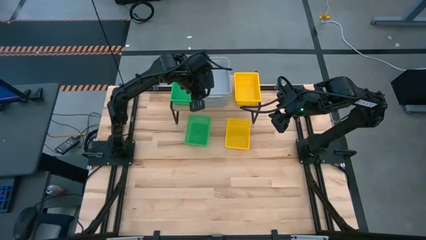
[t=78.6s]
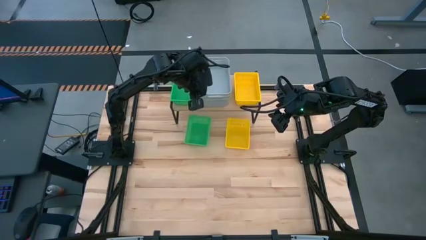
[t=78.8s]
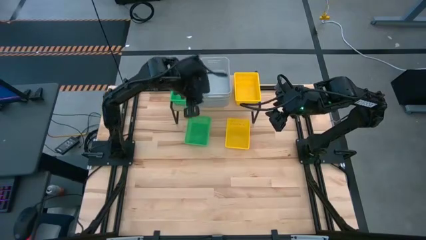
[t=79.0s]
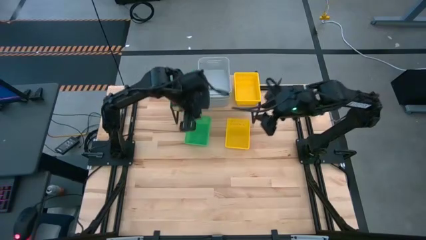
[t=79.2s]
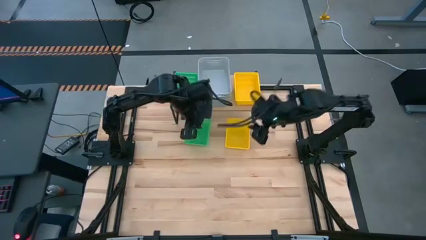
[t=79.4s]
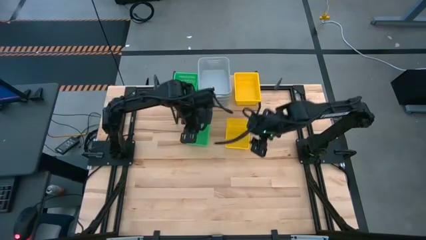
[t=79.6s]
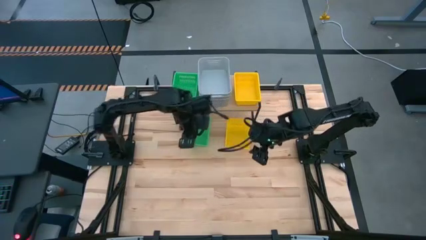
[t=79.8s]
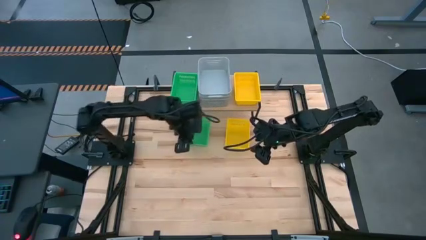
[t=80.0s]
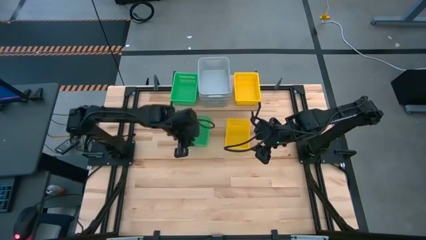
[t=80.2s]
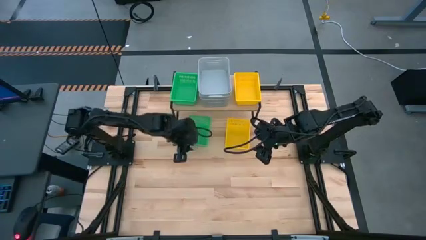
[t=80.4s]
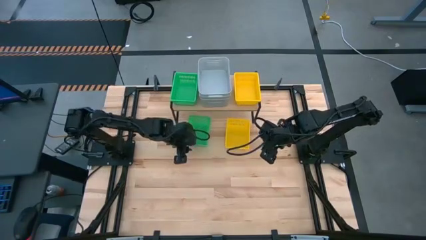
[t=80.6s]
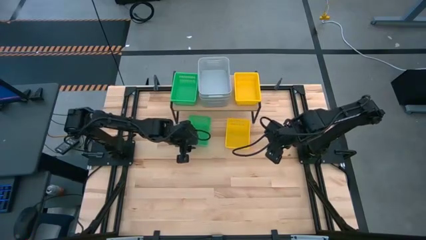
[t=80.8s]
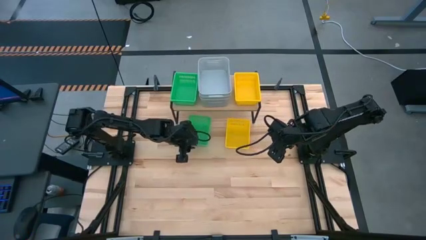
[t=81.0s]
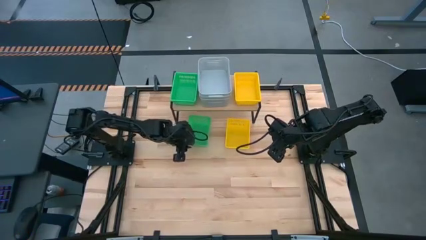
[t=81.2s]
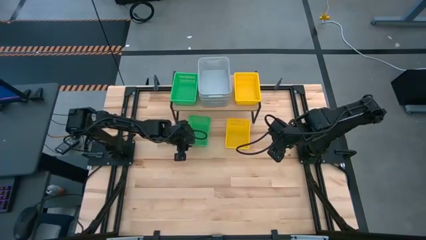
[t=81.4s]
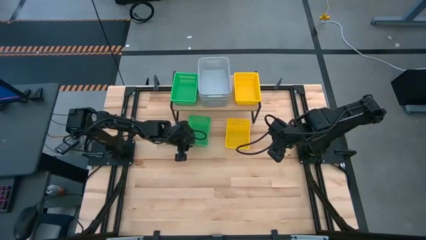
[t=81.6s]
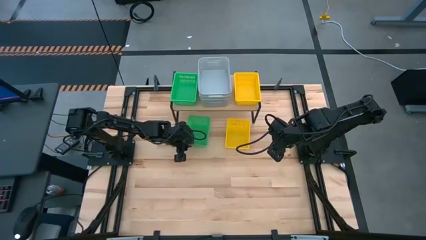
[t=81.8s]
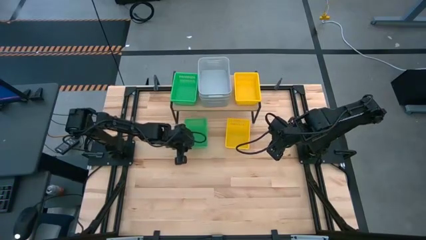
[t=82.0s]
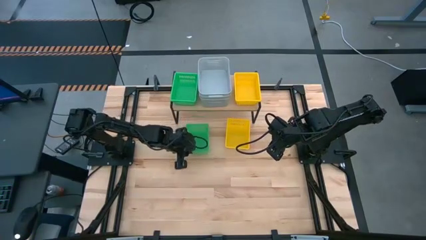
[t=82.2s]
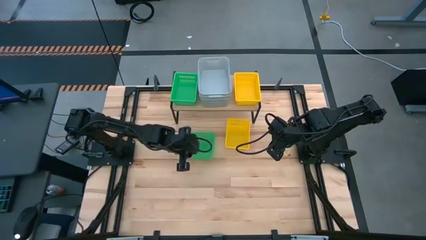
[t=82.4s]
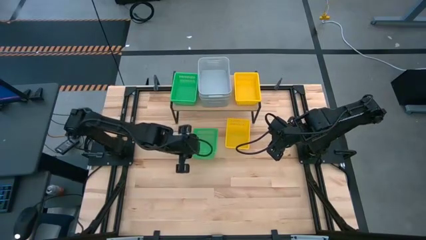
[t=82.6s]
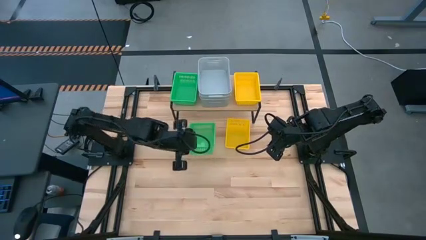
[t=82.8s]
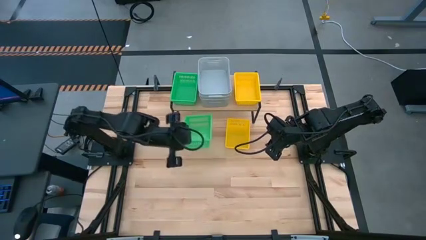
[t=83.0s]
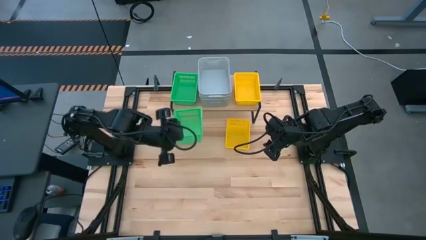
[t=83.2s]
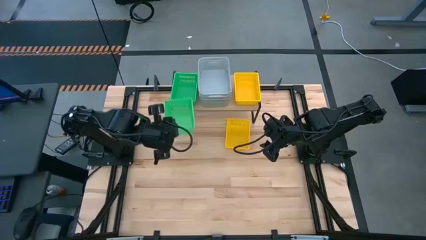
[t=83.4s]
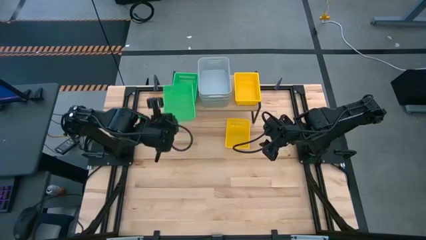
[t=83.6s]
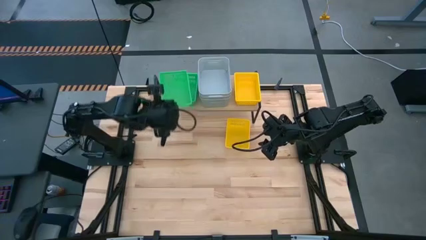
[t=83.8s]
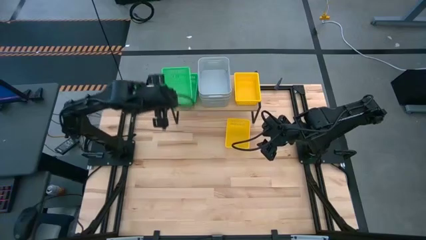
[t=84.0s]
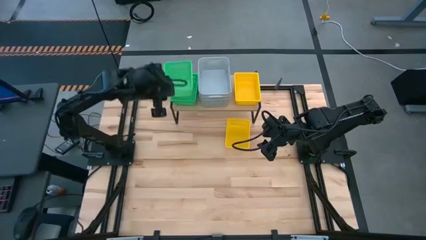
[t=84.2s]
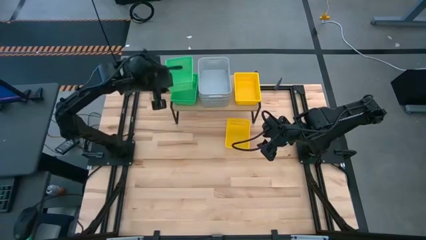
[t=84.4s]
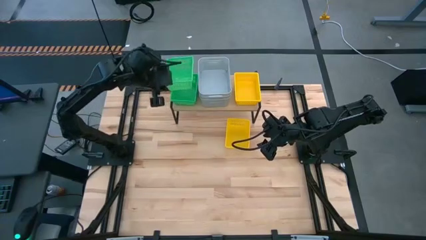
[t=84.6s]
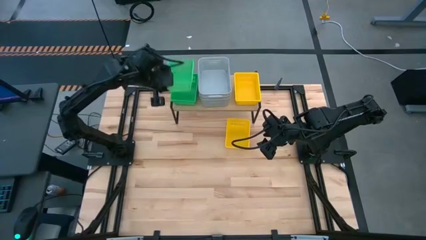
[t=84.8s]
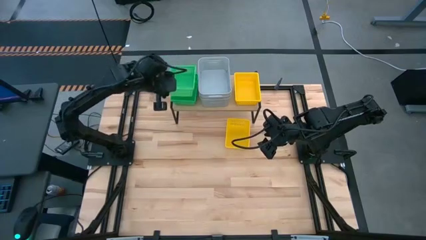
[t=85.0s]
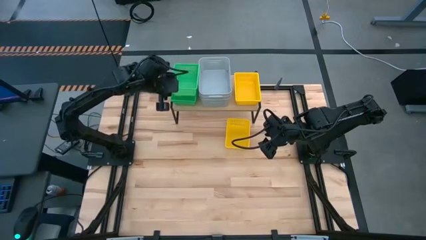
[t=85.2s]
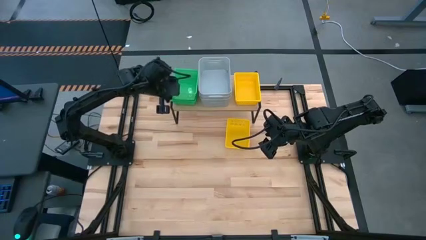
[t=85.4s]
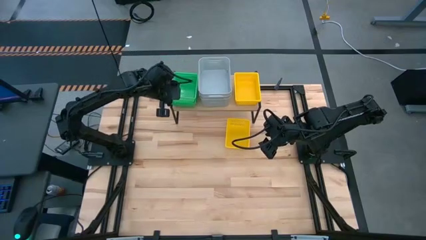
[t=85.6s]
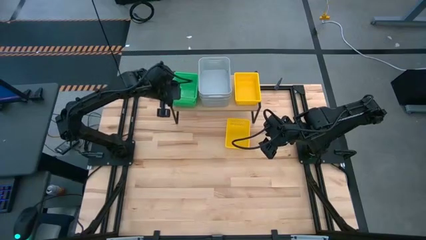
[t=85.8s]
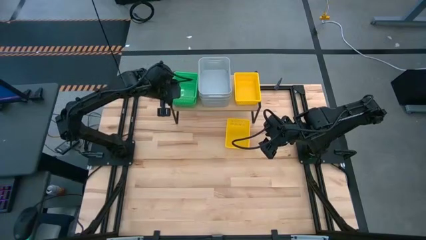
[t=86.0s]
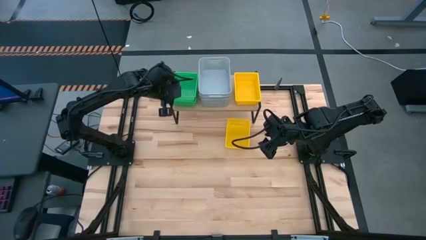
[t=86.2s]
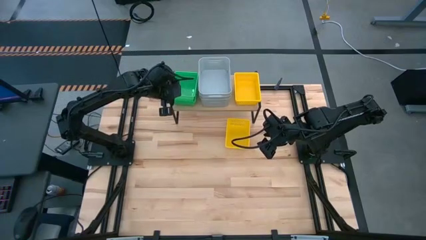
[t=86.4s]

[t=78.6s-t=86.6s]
Task: Stack baskets on shelf by color
Stack the green bin on top of the green bins on the shelf

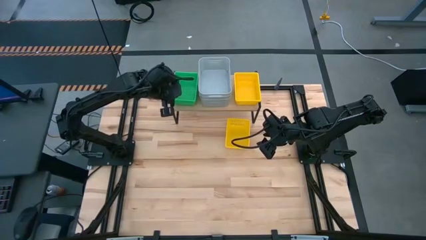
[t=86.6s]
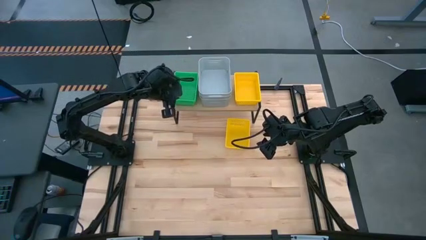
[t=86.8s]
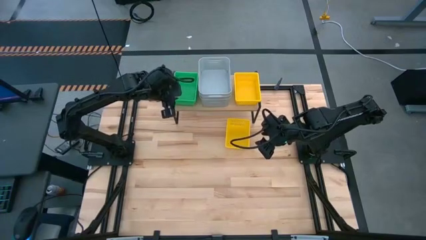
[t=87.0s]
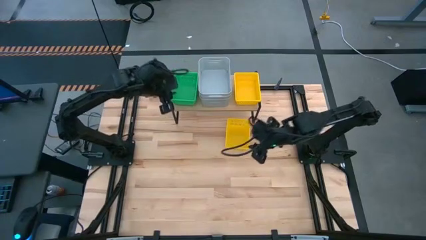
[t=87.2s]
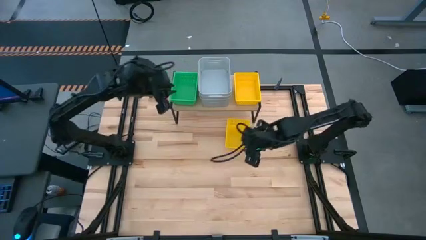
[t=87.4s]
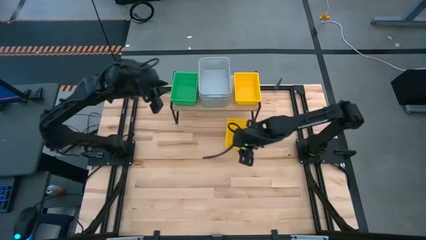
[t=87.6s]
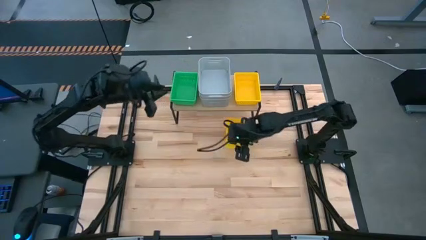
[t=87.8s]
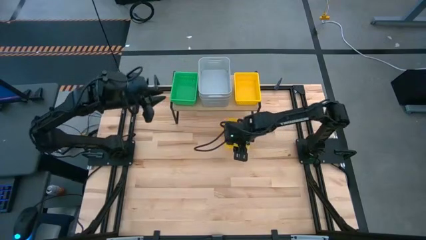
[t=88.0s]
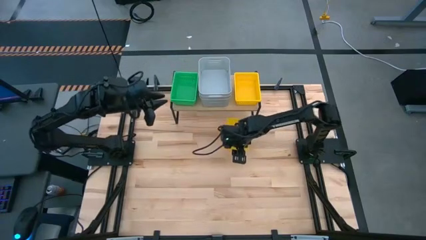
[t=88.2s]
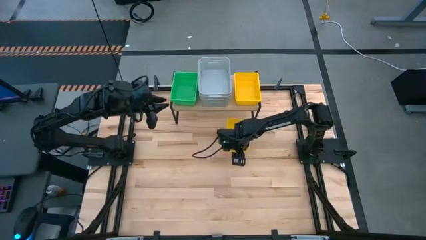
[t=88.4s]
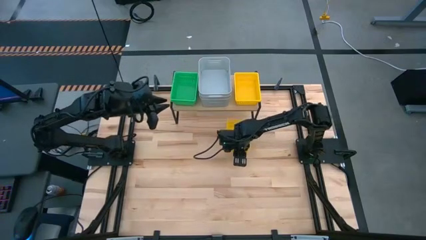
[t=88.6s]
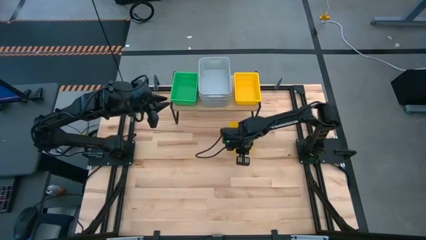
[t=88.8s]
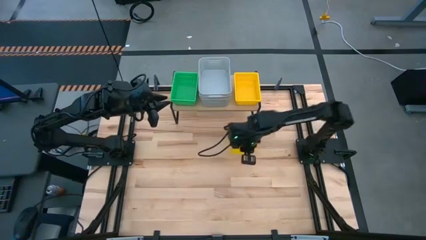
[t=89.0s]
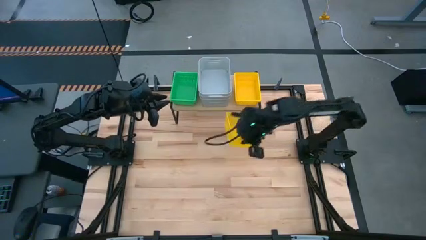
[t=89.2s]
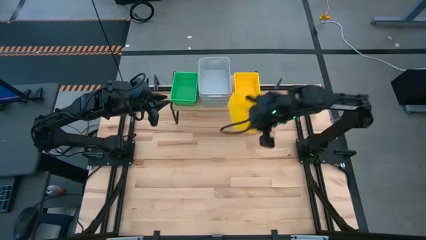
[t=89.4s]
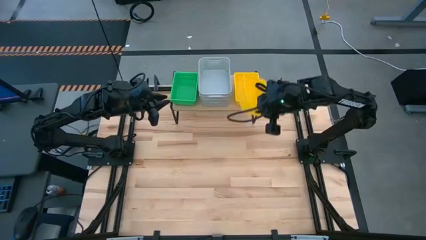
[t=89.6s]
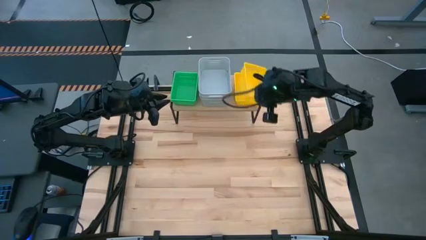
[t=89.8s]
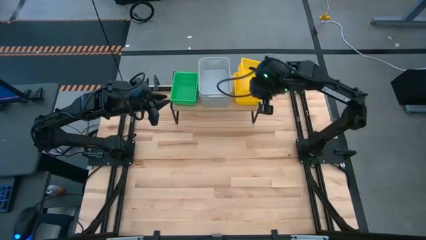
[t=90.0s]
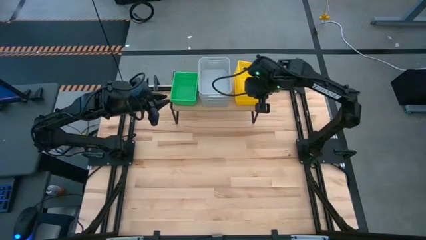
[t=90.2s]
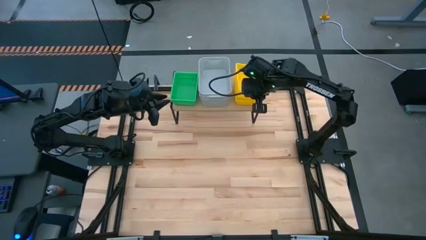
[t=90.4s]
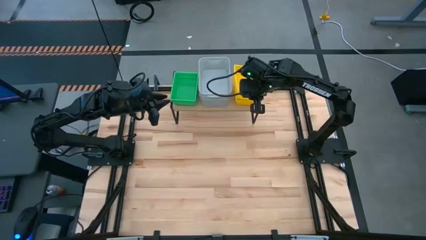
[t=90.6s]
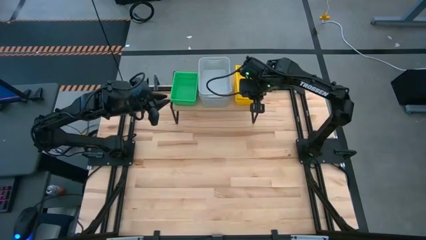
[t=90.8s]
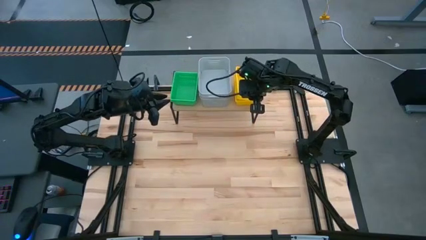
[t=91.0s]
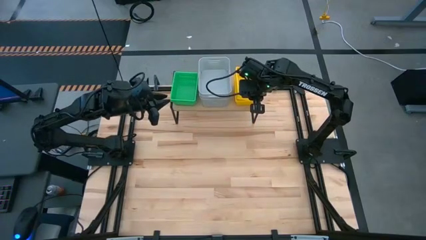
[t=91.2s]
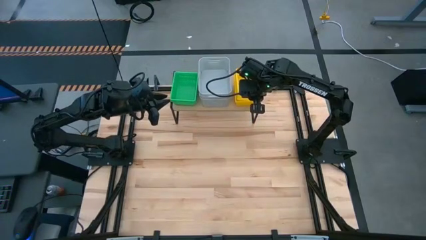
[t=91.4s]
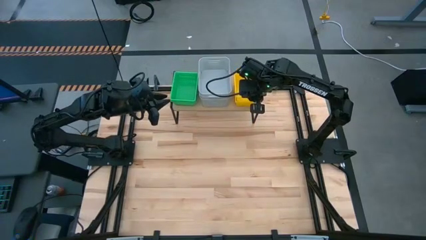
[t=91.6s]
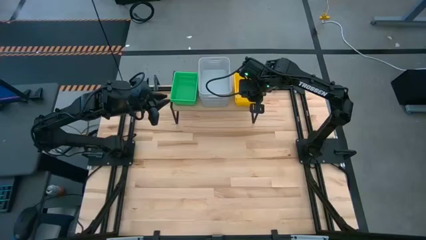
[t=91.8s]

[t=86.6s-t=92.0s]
Stack the yellow bin on top of the yellow bins on the shelf
